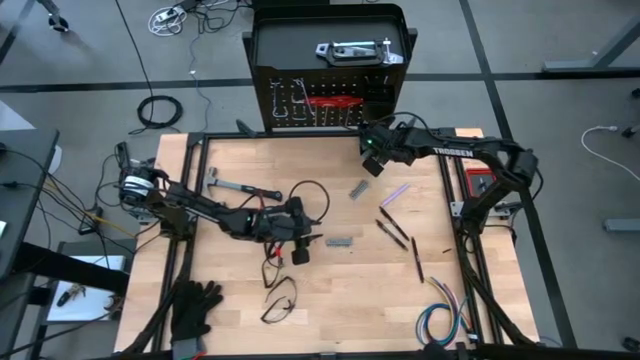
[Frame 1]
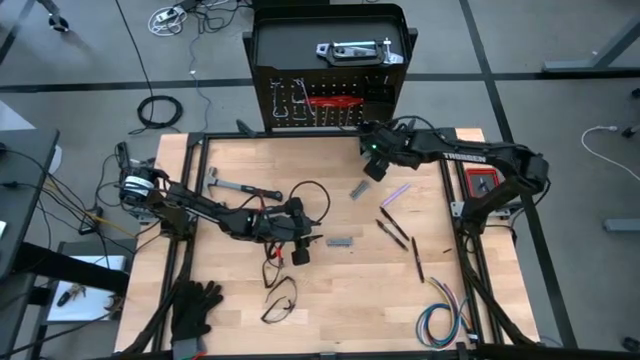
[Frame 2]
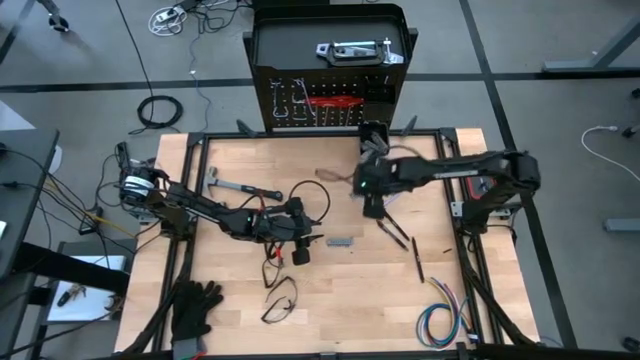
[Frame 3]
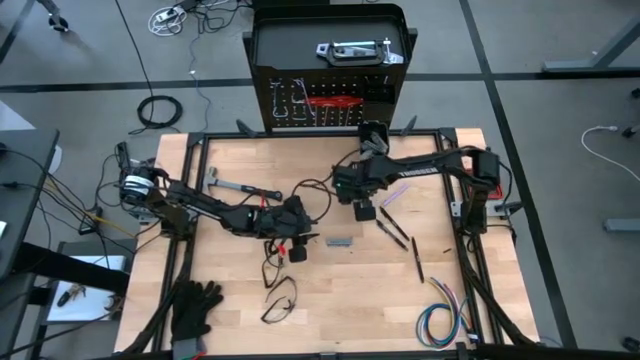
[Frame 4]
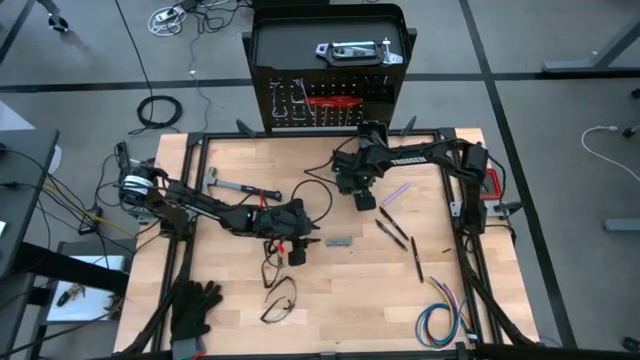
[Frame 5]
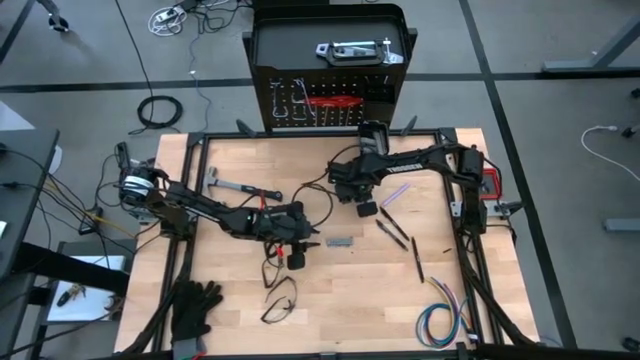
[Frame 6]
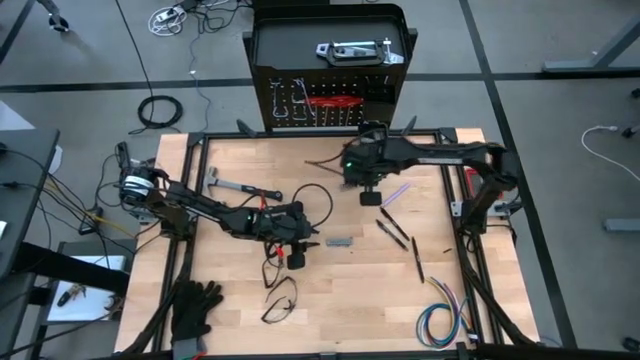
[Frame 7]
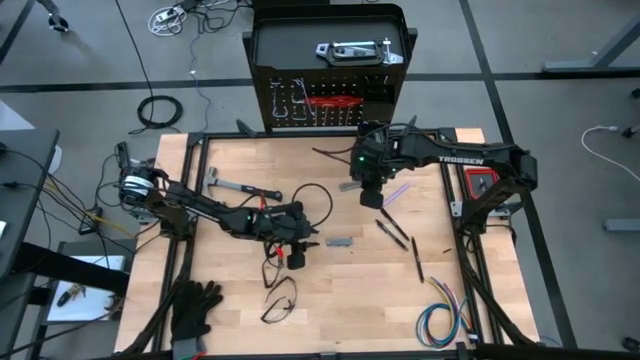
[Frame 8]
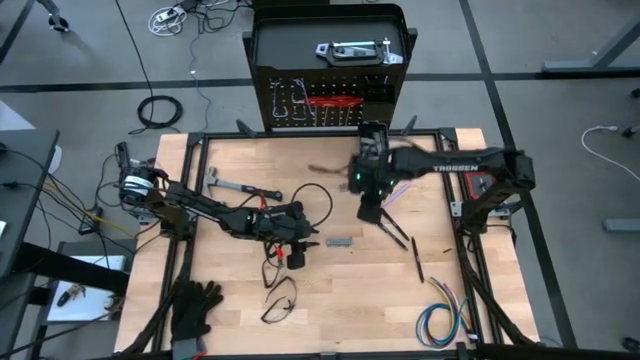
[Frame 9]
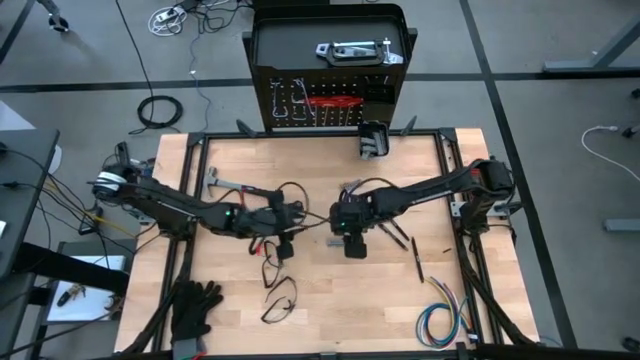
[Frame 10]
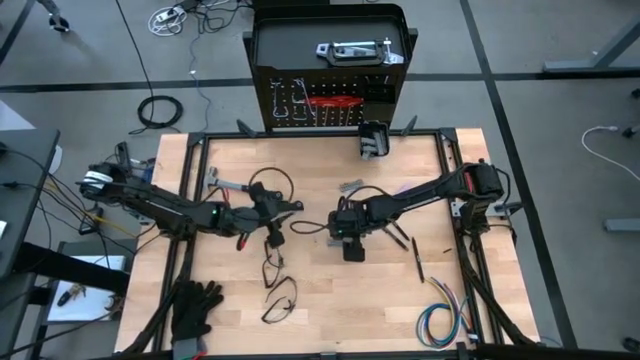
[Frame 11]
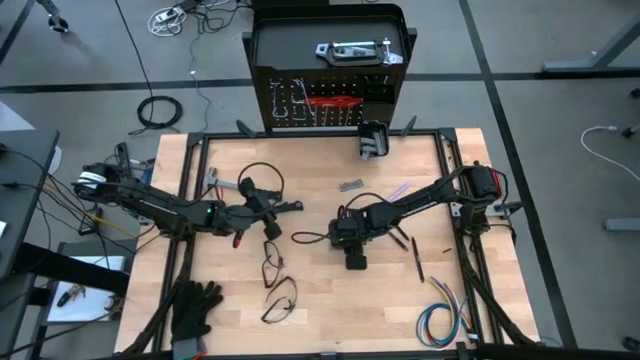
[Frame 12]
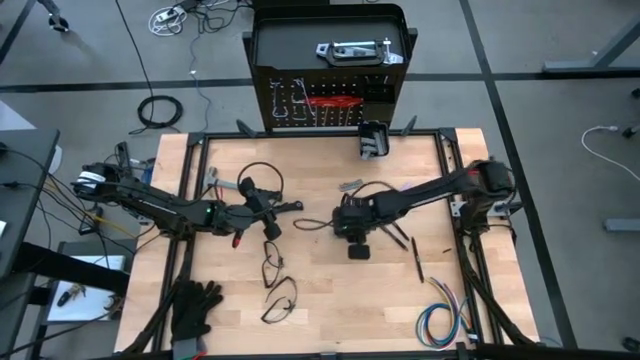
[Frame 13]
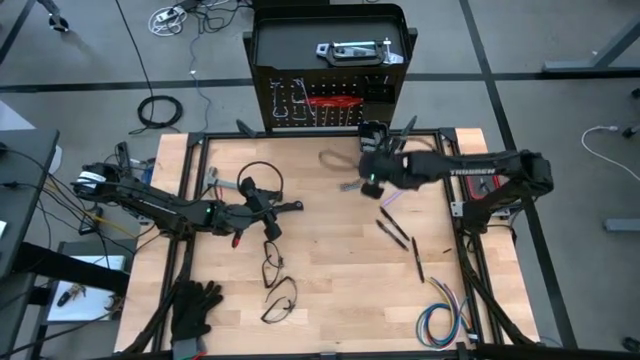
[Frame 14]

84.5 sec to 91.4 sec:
Task: Hang tools onto peg board
Put the screwdriver bits on the pegboard

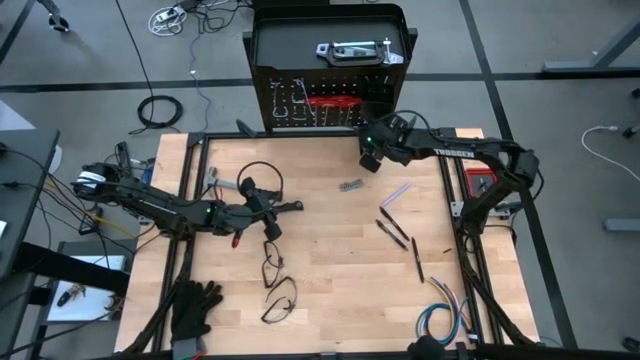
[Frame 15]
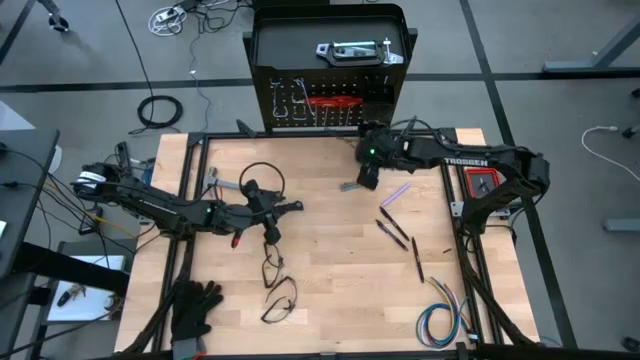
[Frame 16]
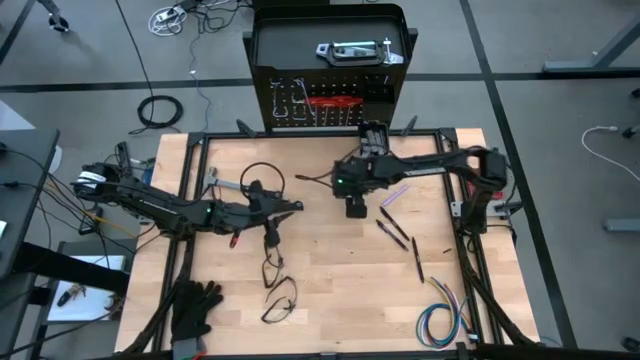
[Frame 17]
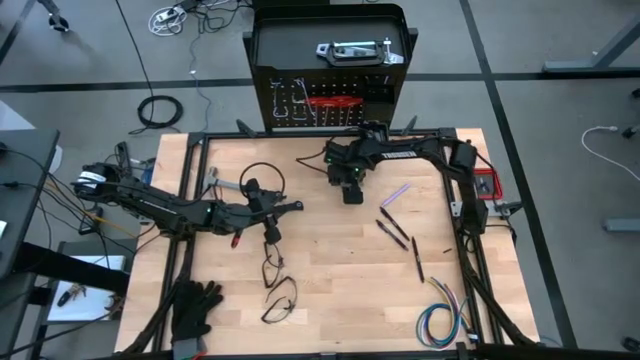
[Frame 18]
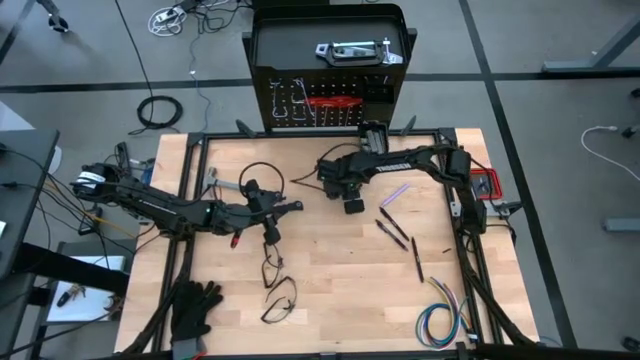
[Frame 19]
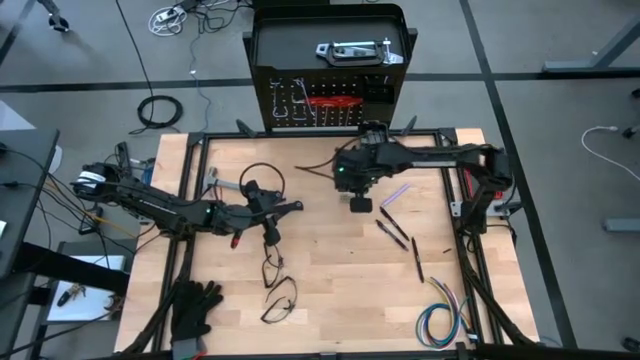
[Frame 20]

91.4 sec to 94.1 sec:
Put the screwdriver bits on the pegboard

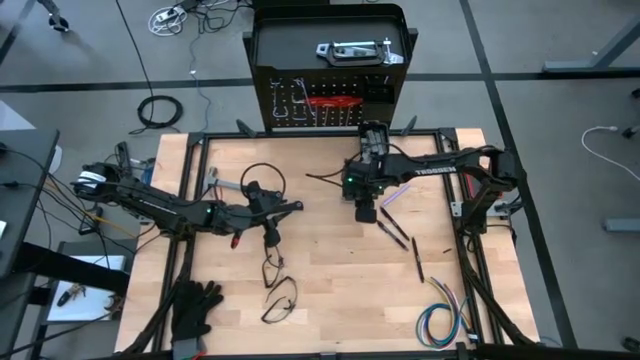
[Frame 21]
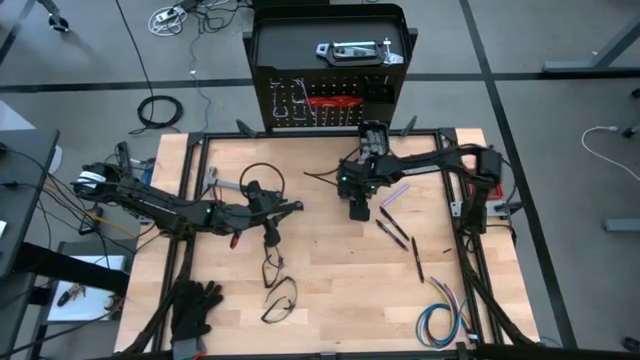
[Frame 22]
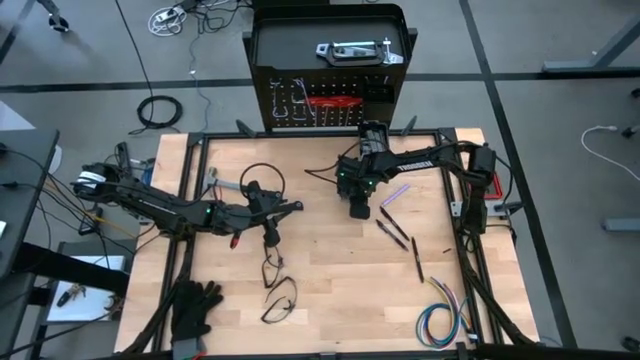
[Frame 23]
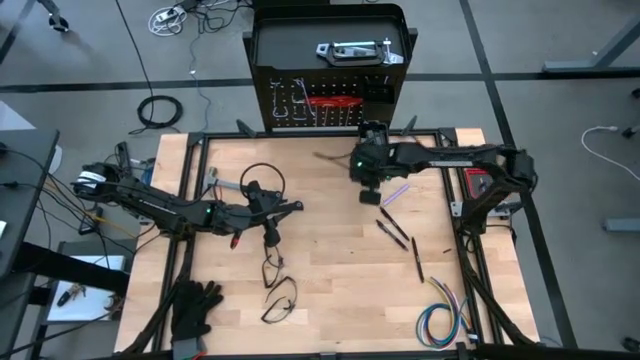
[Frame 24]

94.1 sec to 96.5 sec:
Put the screwdriver bits on the pegboard

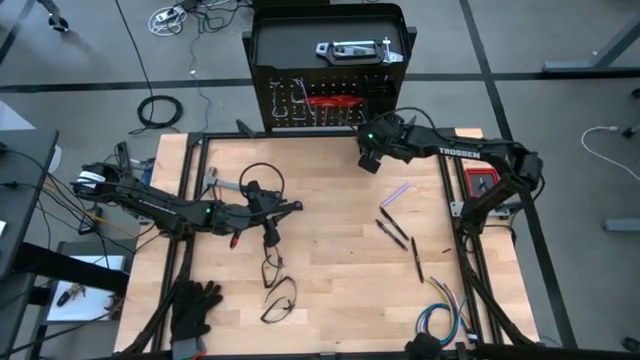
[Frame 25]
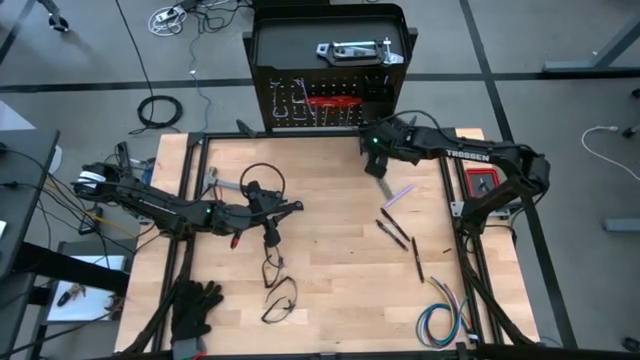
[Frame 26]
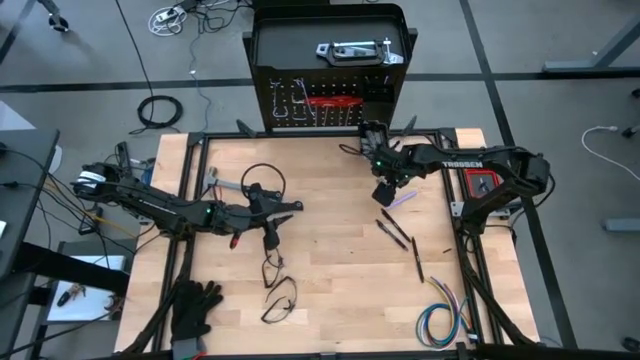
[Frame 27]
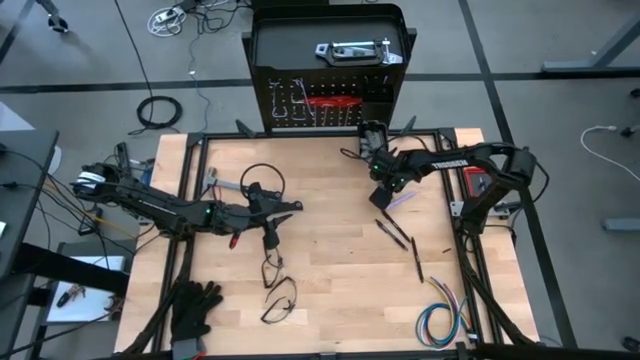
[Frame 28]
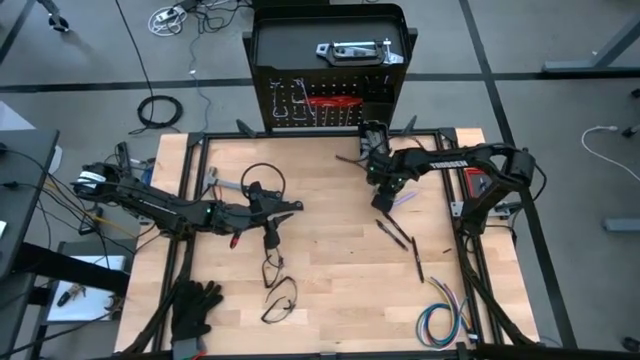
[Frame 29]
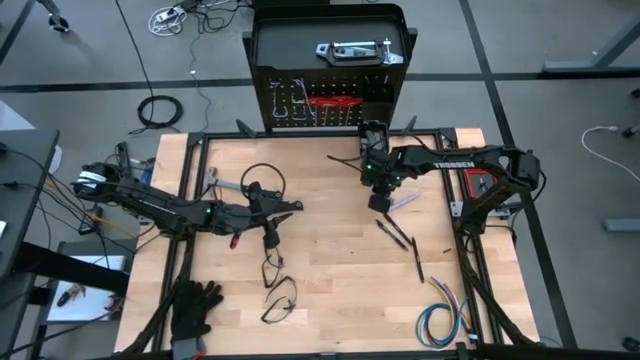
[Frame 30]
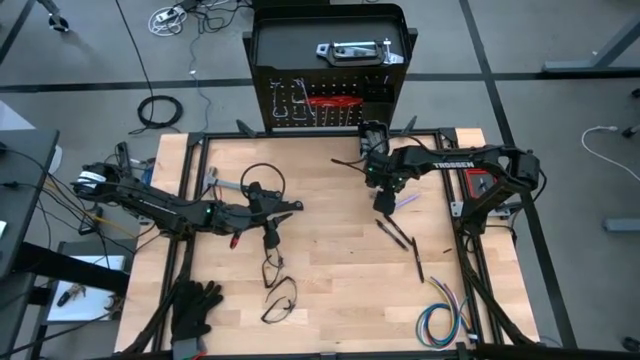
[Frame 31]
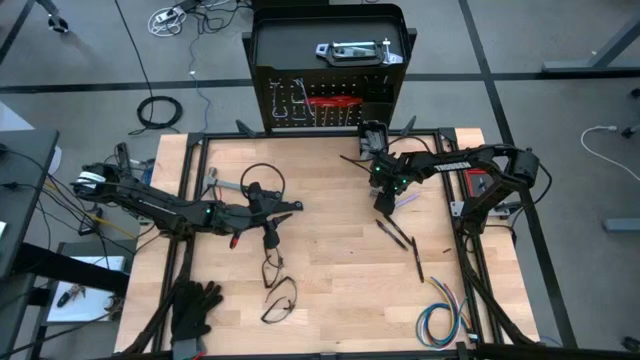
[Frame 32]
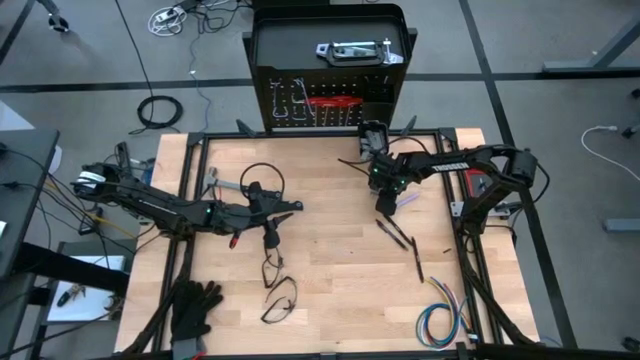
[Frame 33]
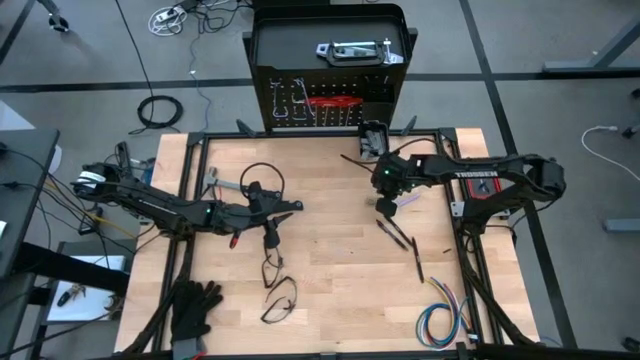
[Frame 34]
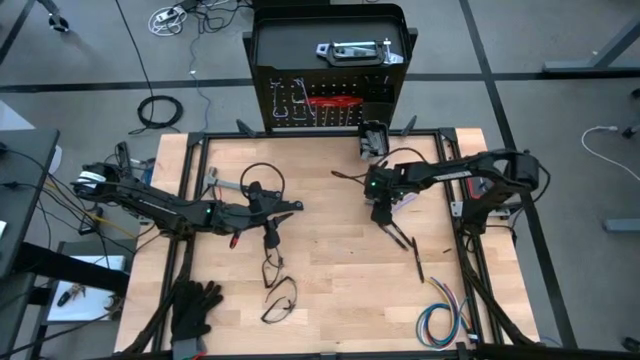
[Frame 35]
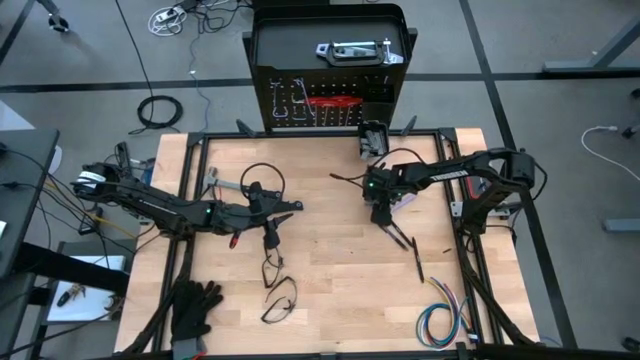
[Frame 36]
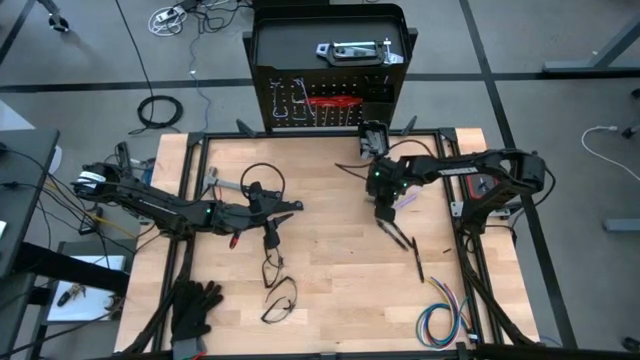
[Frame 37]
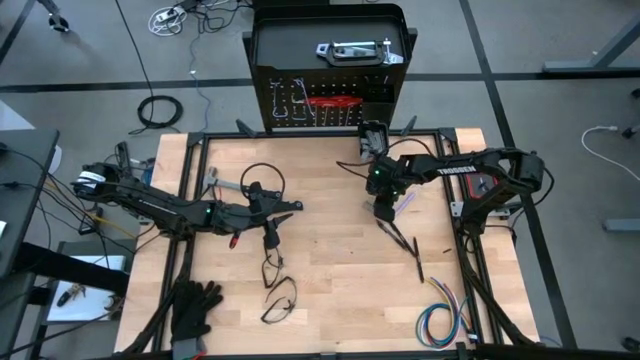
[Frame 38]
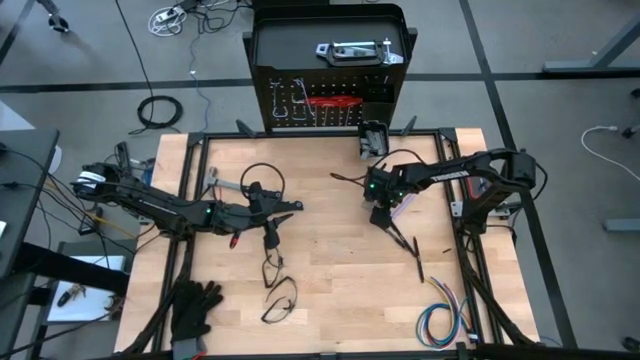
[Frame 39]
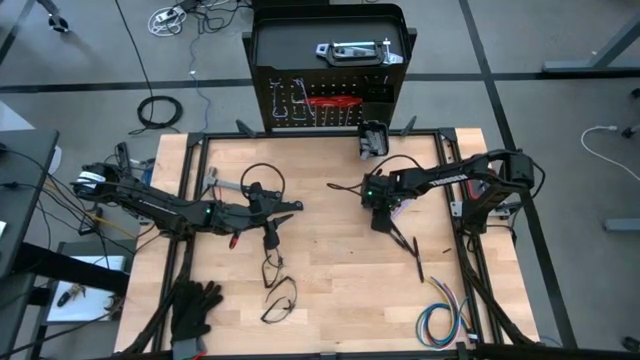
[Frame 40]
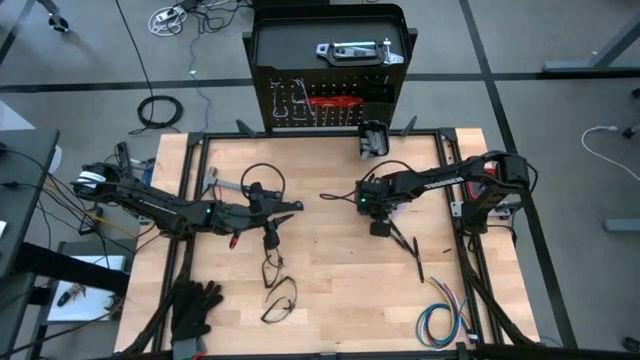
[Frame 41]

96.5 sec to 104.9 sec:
Put the screwdriver bits on the pegboard
